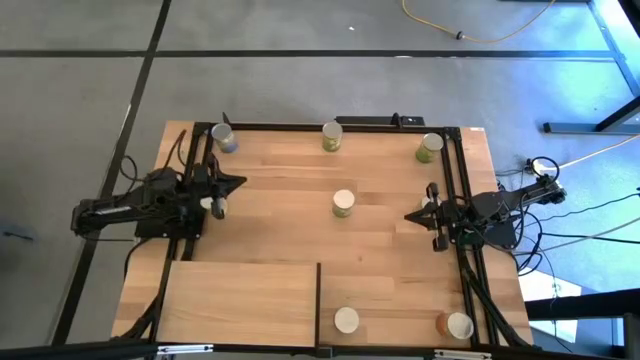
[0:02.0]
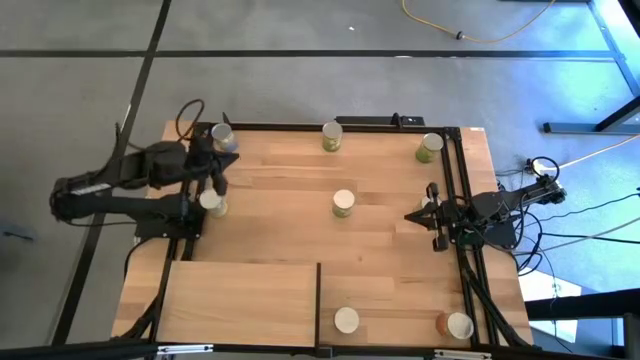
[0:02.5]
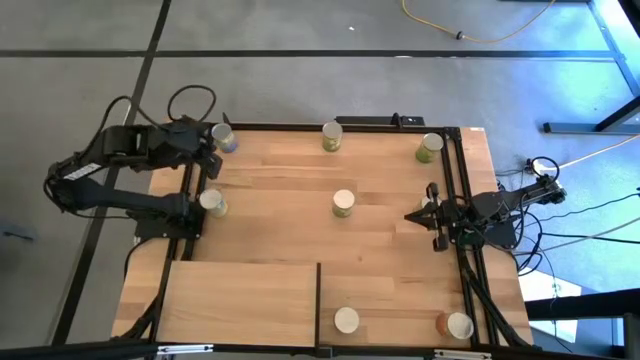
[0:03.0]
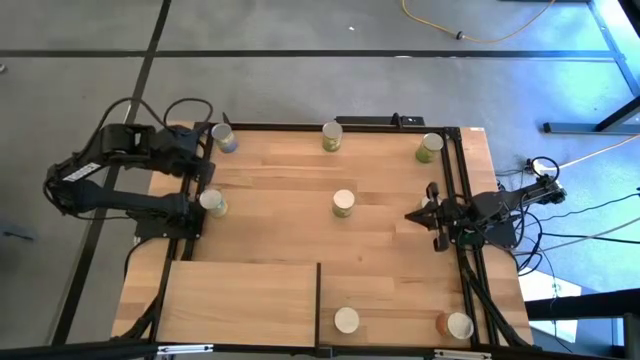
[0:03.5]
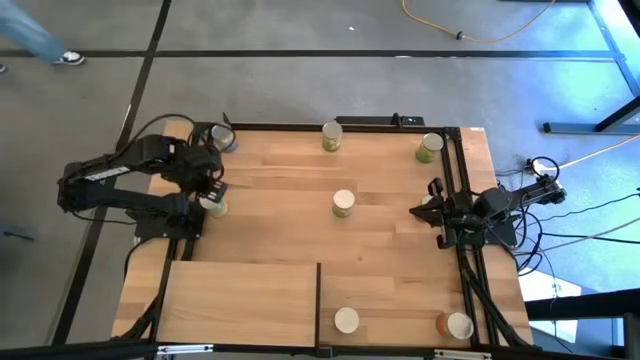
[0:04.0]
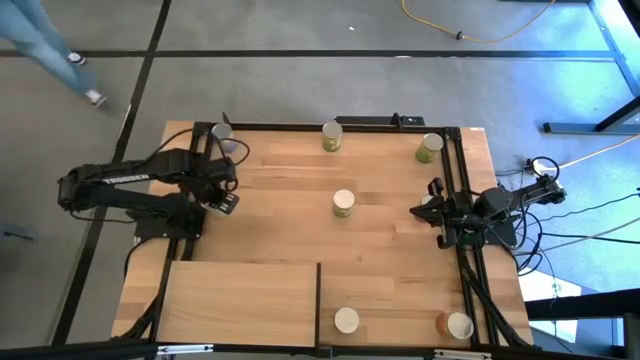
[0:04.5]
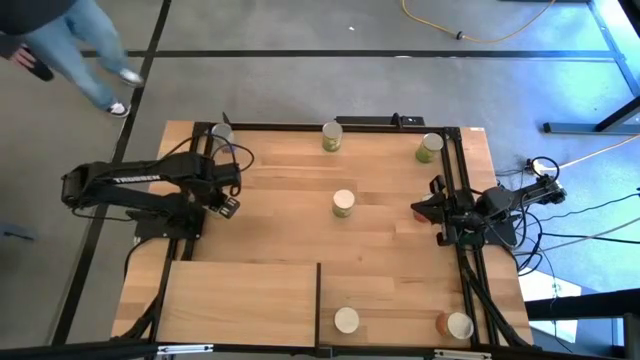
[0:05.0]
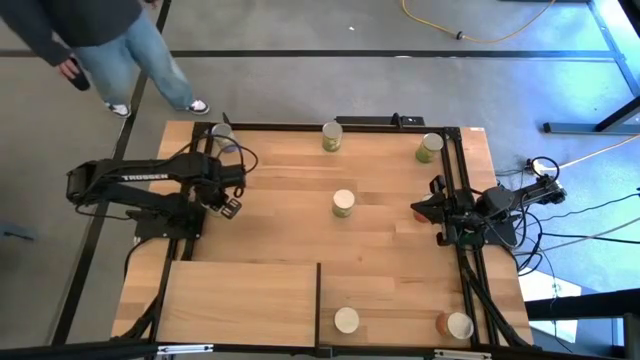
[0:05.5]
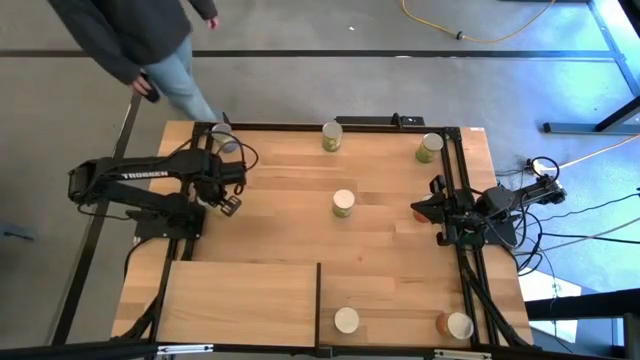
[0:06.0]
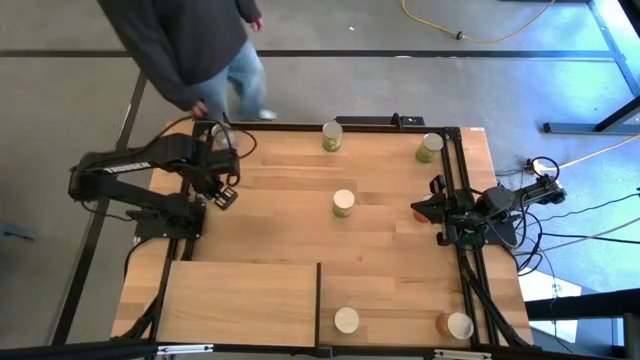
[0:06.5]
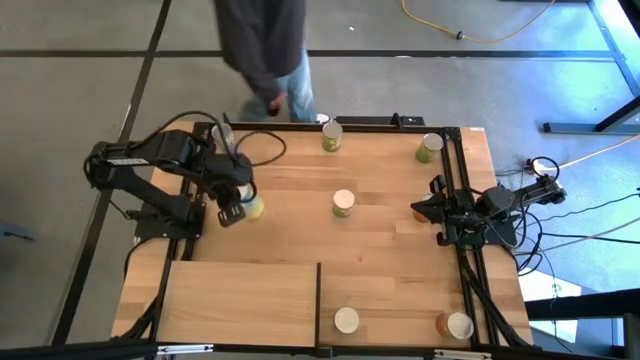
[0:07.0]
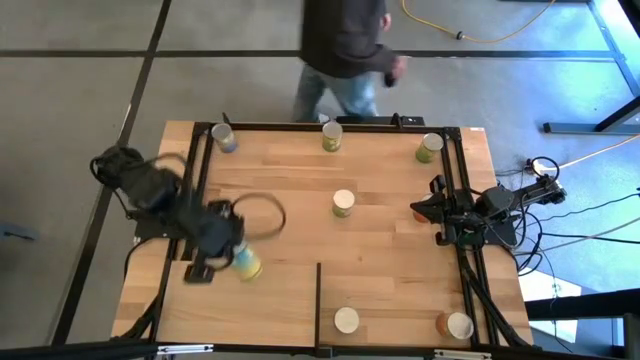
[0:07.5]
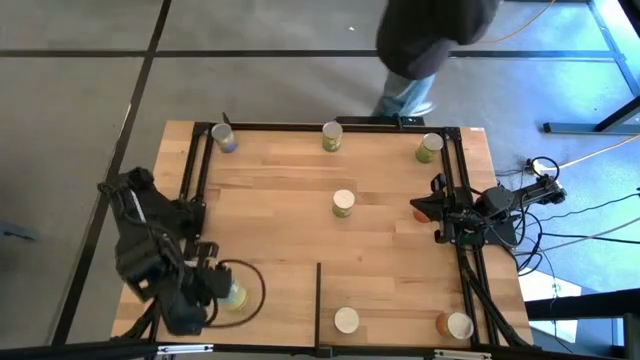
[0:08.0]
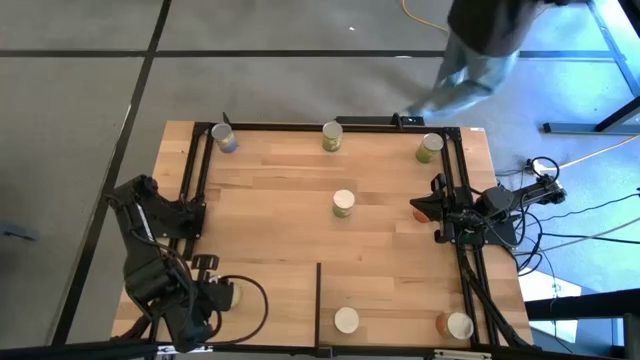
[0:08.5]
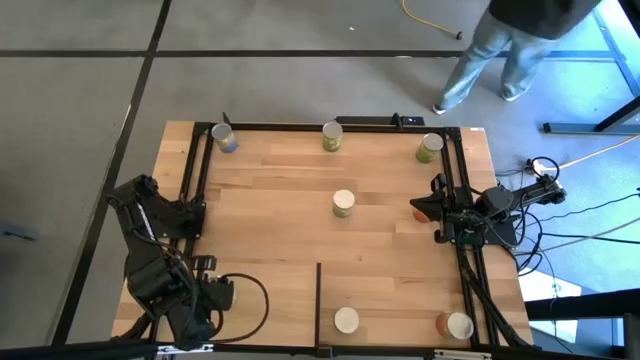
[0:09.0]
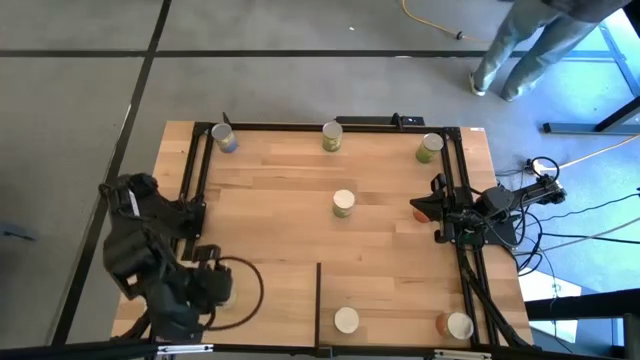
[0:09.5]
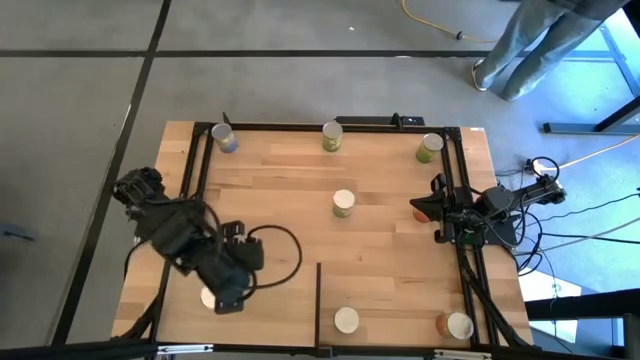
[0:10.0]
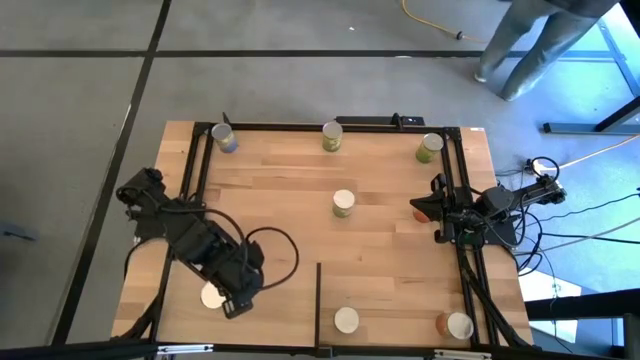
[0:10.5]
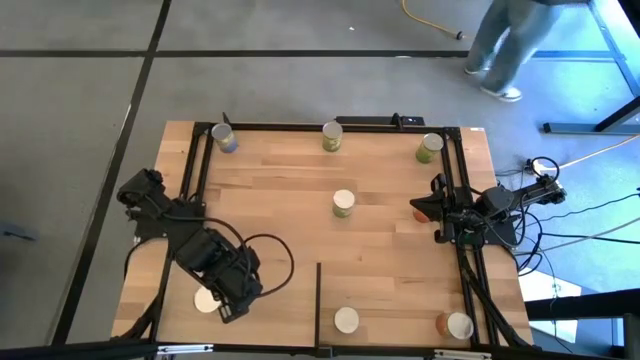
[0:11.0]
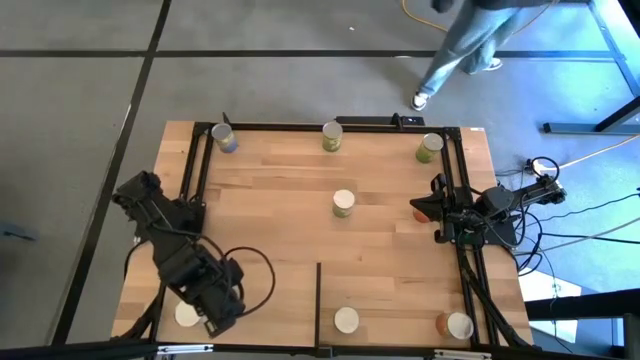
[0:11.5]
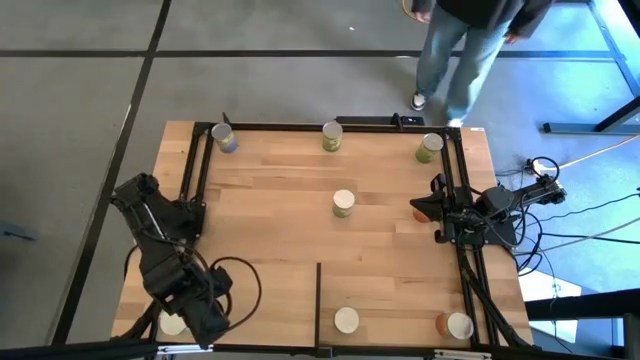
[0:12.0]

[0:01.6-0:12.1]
Task: Pick and place cans onto a shelf
Put the canned carrots on the shelf

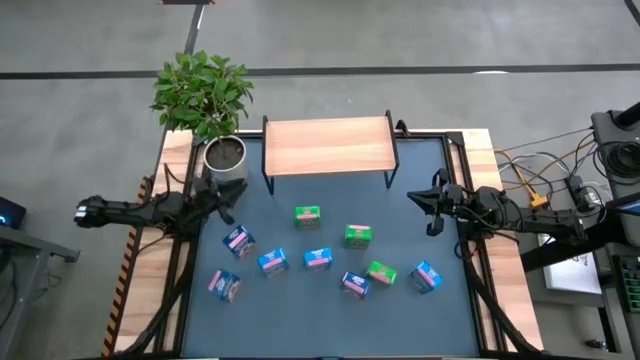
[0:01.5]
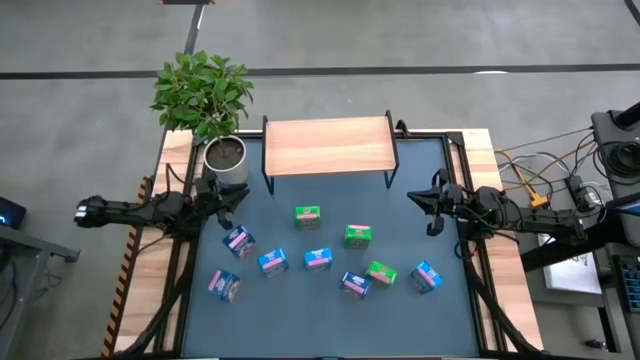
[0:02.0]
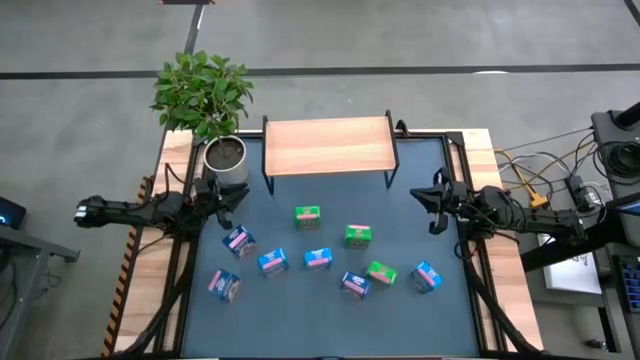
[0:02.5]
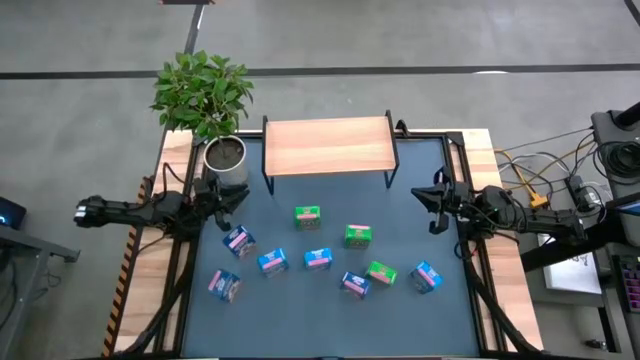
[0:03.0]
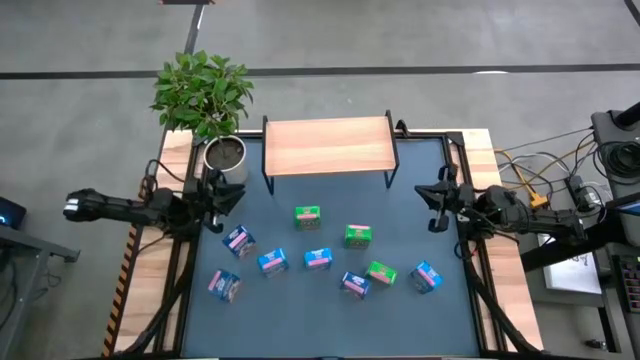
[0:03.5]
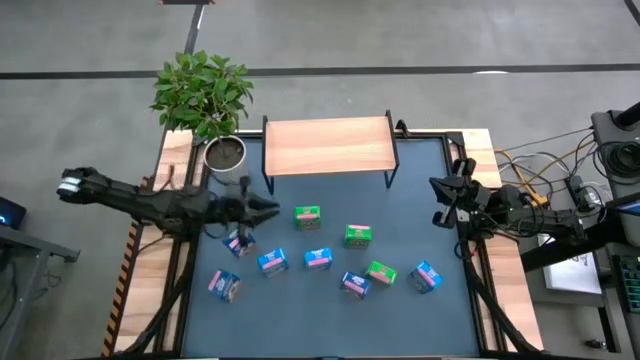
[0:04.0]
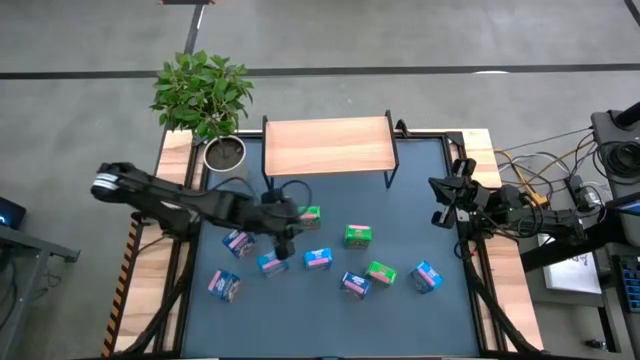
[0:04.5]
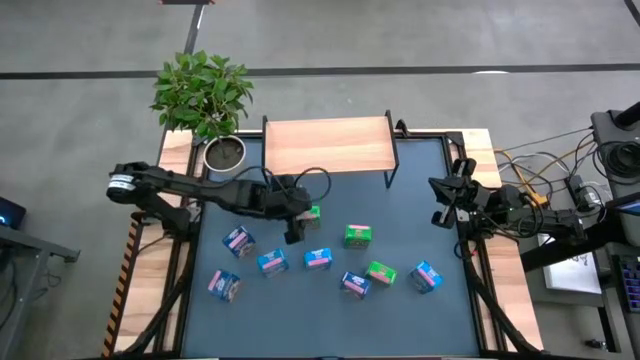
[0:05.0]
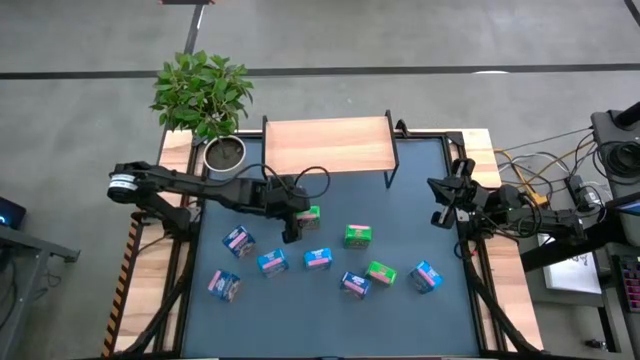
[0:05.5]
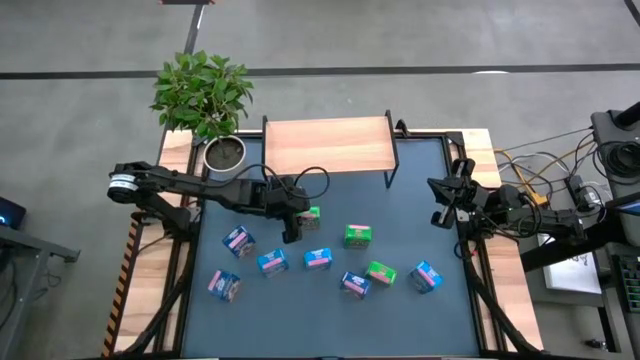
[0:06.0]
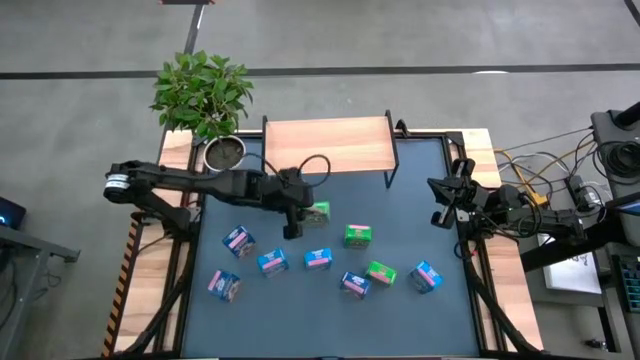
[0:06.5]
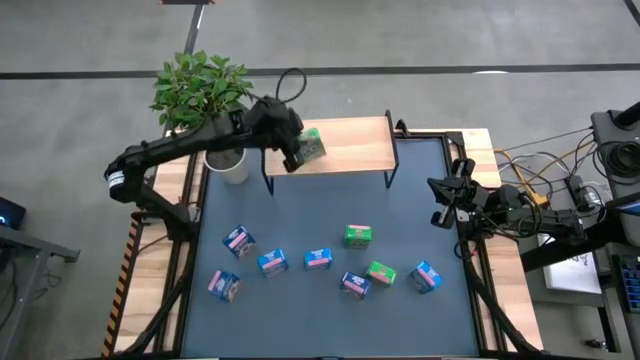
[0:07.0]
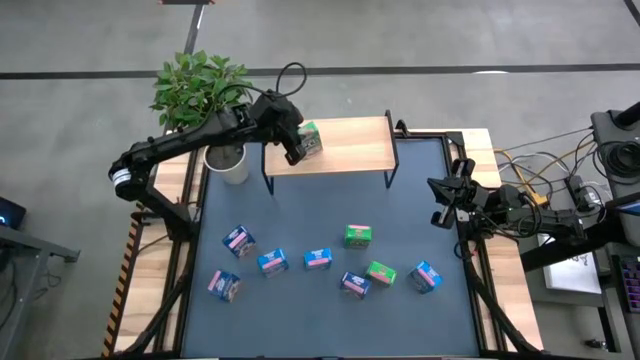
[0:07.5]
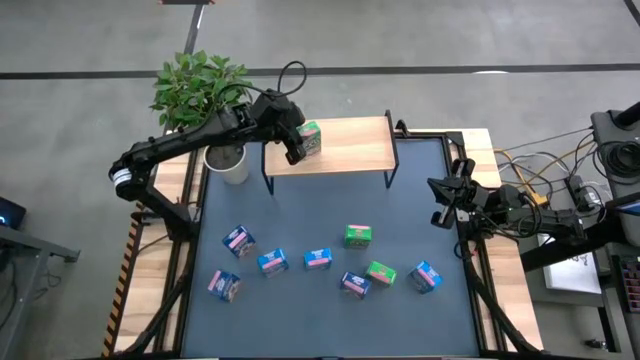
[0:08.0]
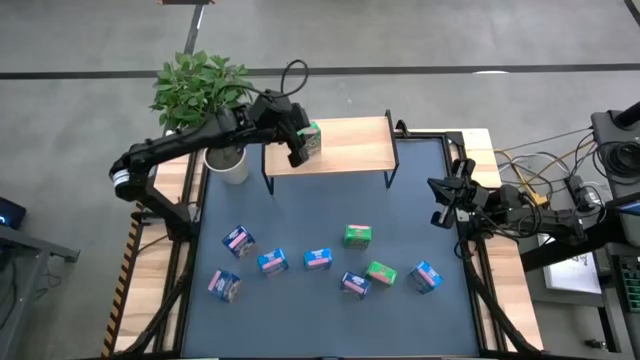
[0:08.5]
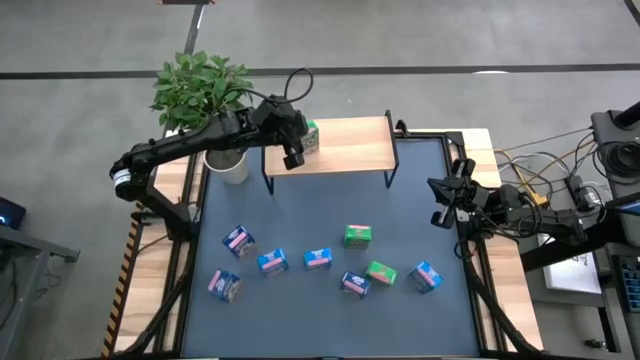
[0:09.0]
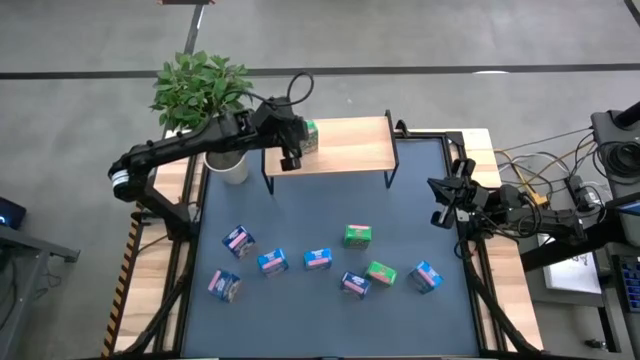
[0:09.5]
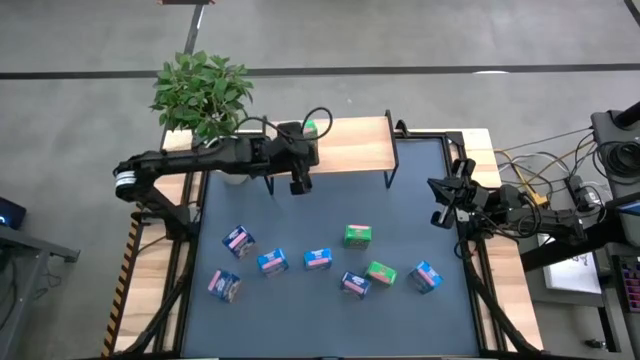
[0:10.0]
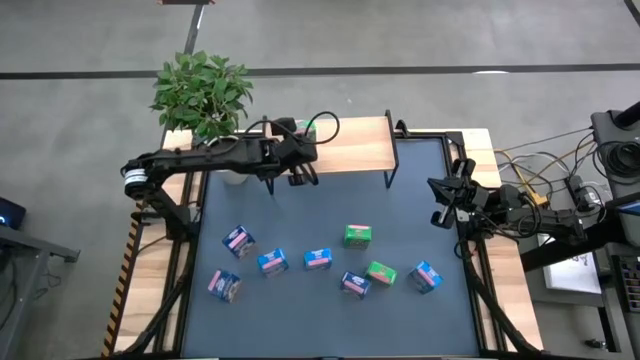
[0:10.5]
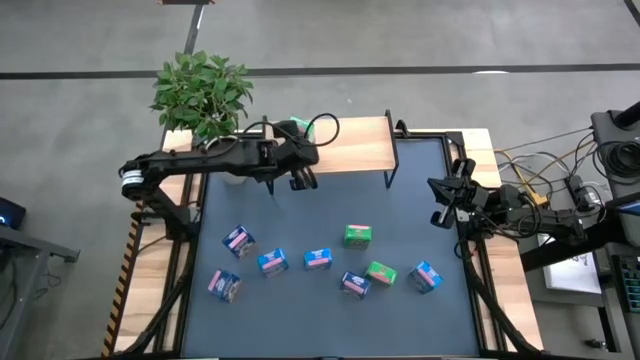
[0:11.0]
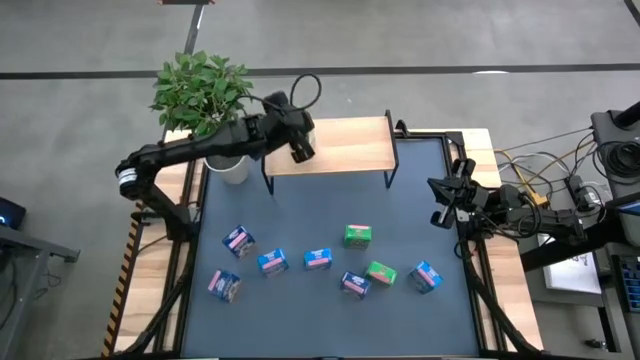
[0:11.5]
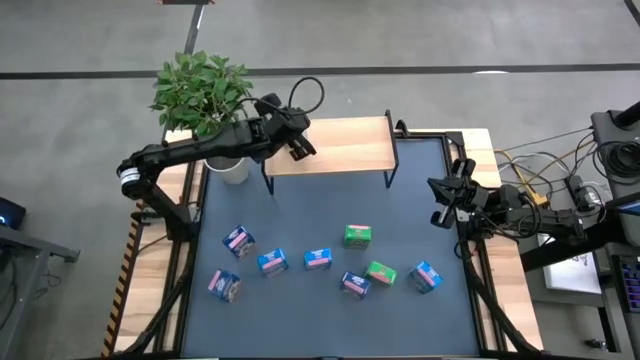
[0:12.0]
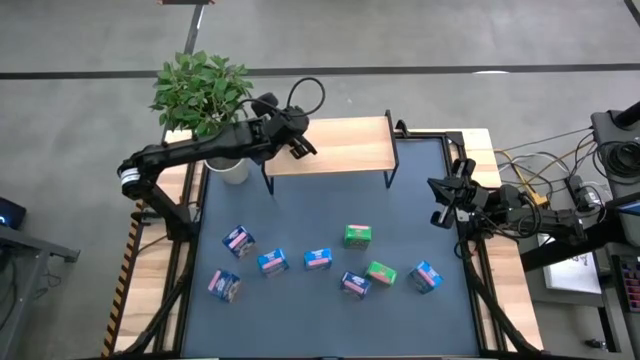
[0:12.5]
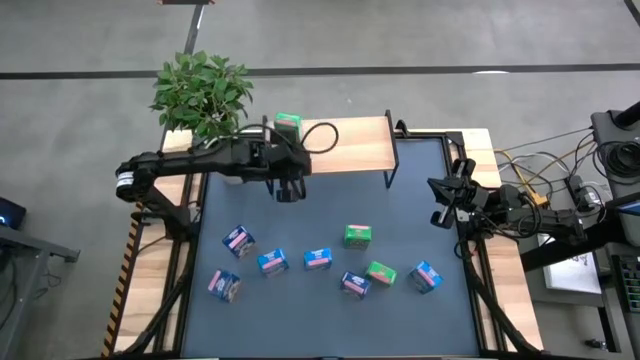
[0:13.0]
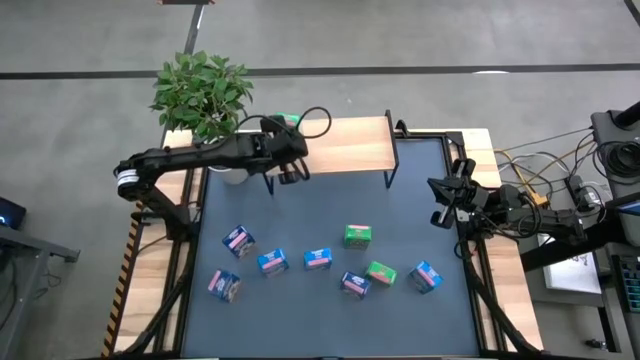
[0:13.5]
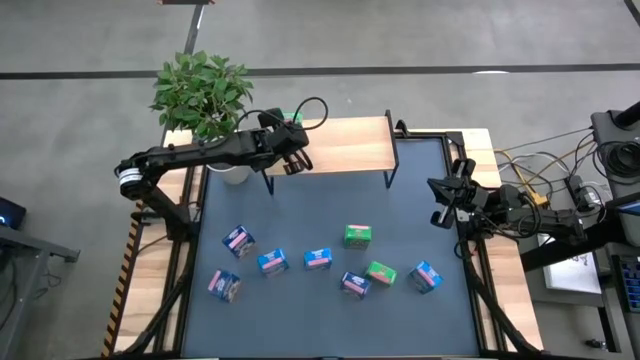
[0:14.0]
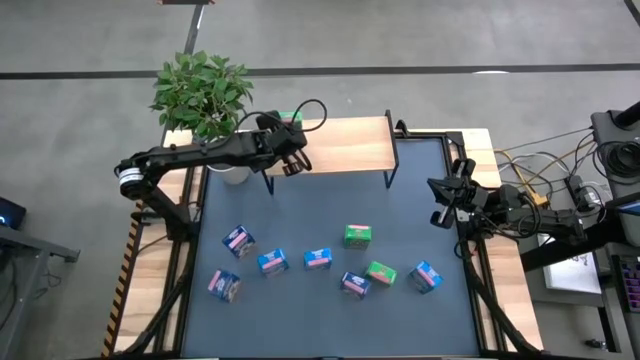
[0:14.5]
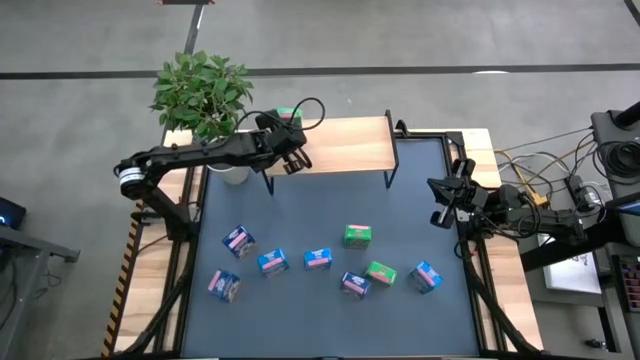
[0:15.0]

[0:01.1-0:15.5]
Task: Stack cereal on shelf
Put the top left green cereal box on the shelf
